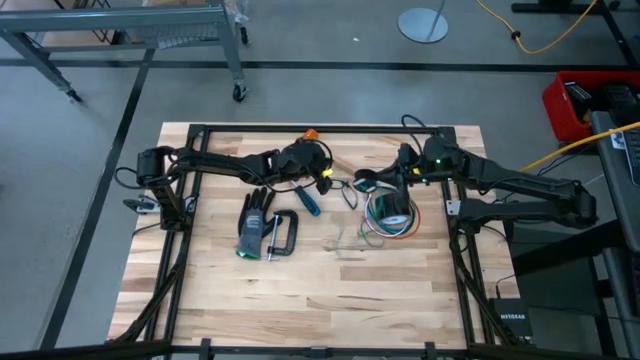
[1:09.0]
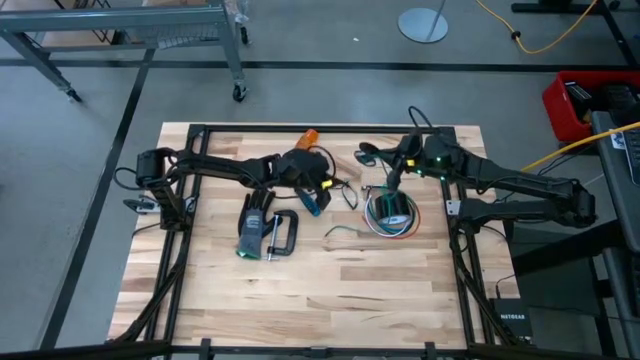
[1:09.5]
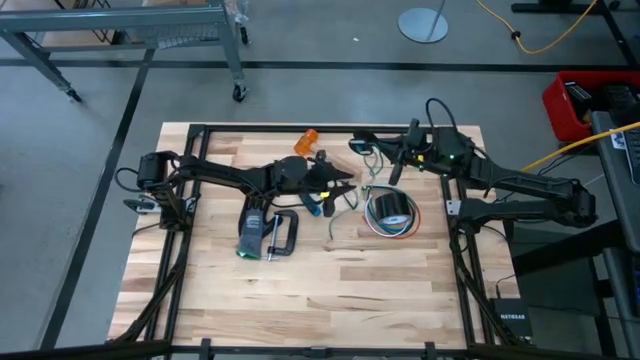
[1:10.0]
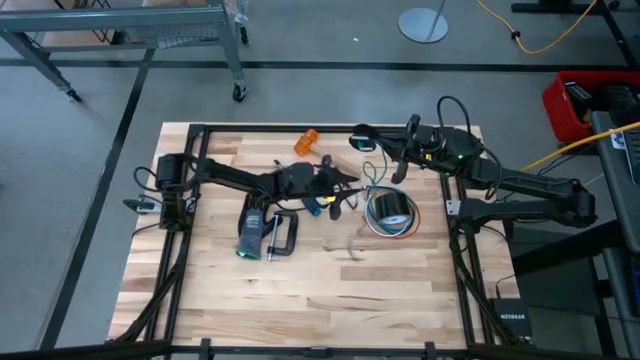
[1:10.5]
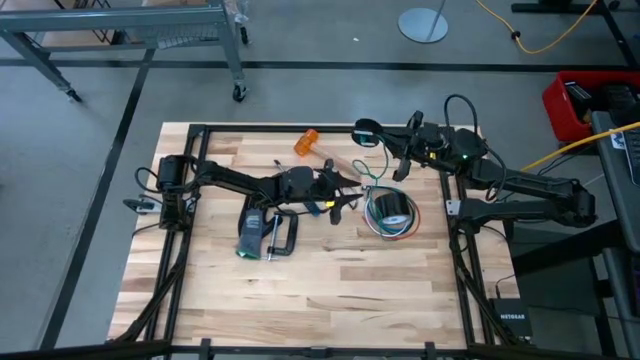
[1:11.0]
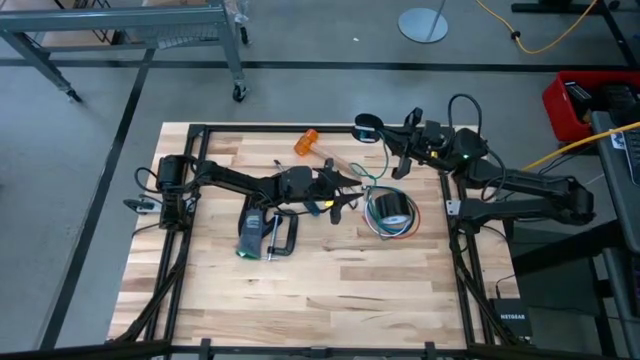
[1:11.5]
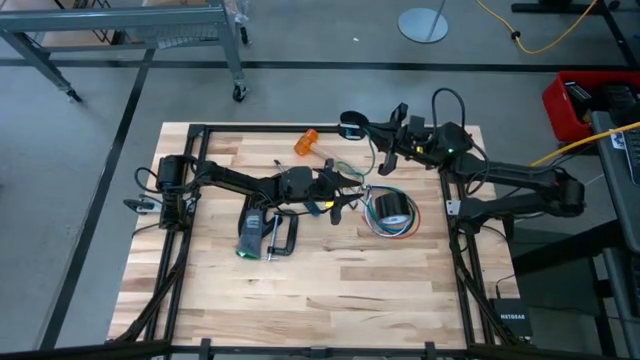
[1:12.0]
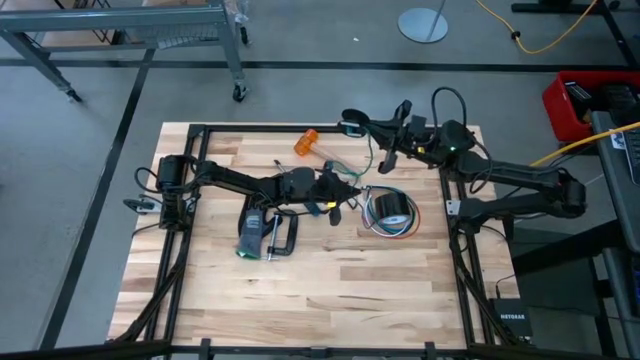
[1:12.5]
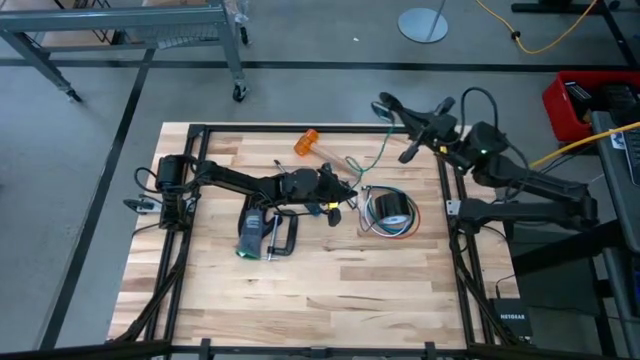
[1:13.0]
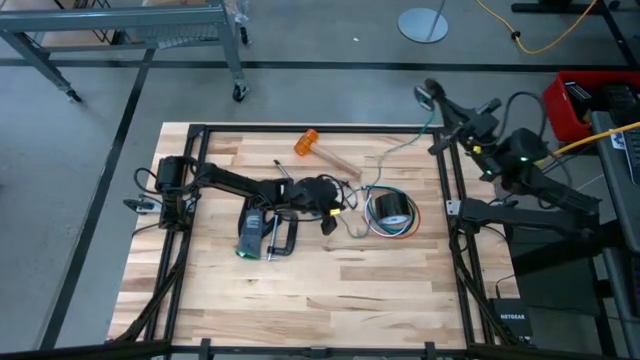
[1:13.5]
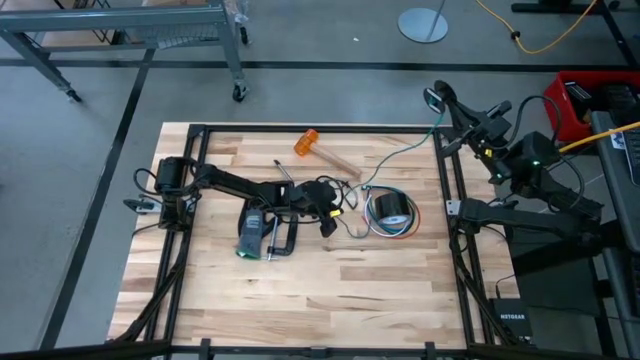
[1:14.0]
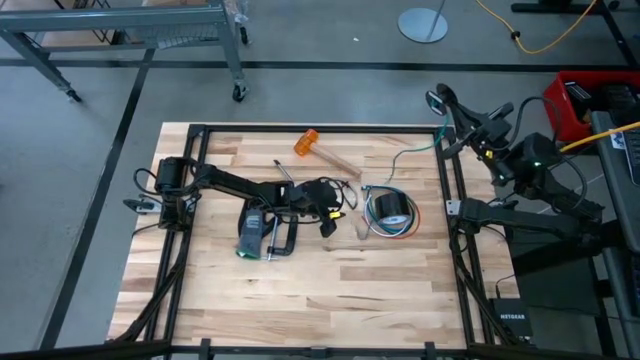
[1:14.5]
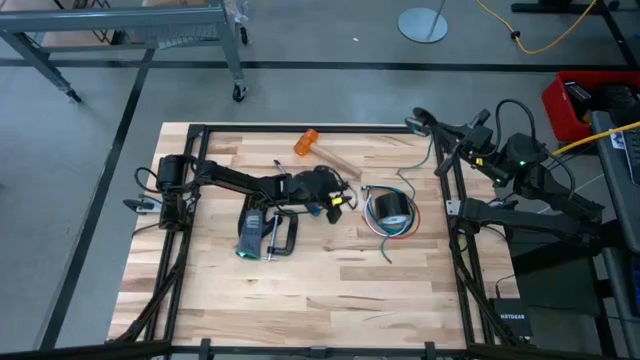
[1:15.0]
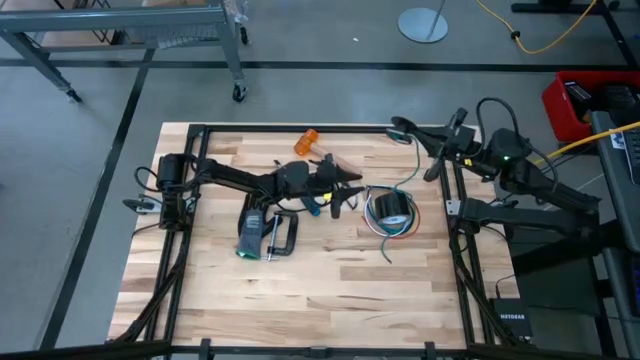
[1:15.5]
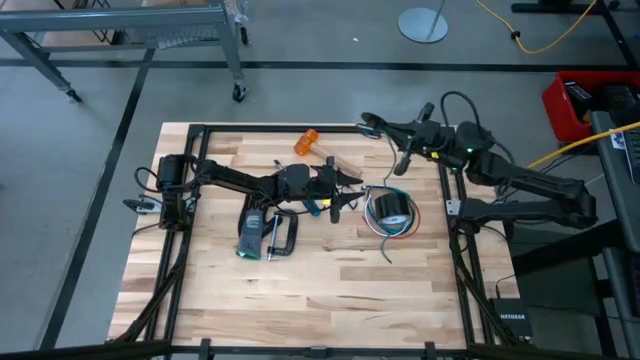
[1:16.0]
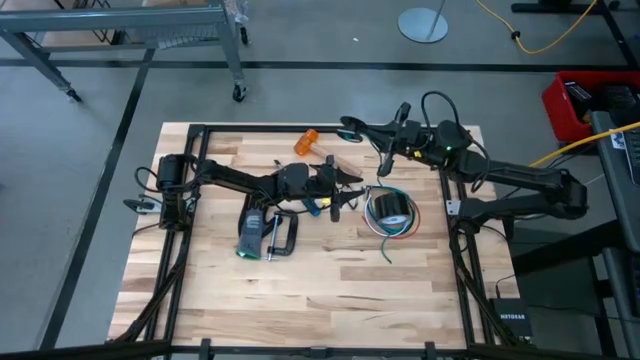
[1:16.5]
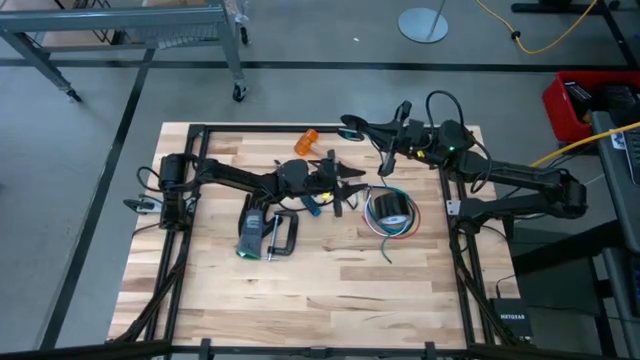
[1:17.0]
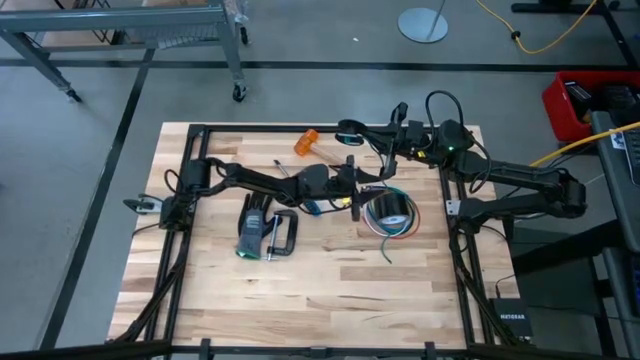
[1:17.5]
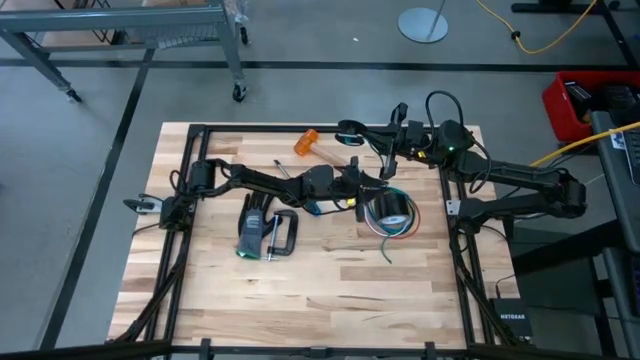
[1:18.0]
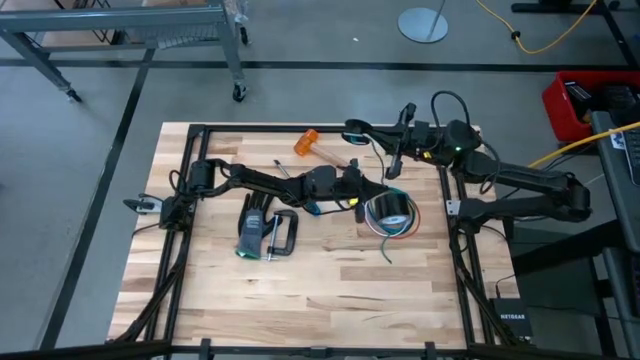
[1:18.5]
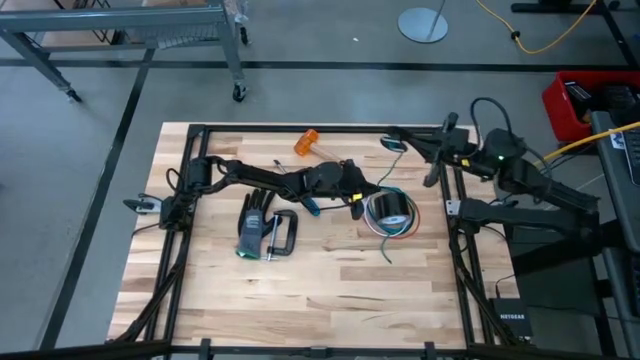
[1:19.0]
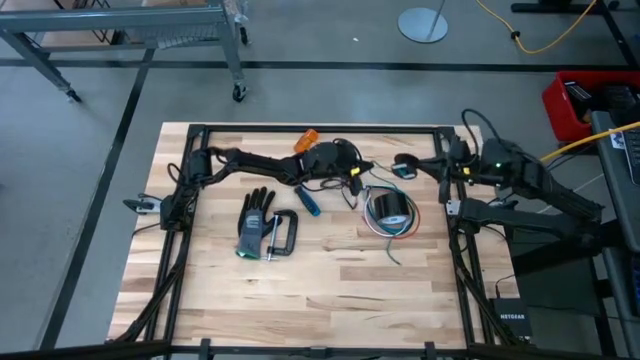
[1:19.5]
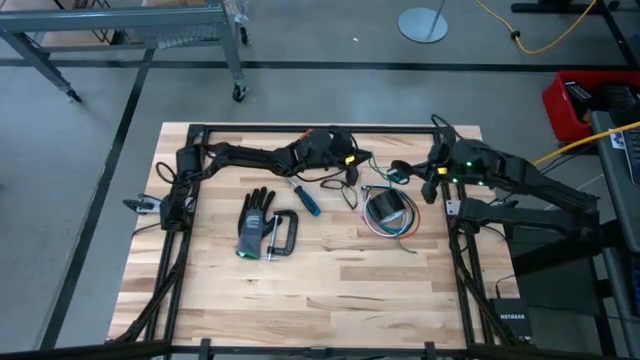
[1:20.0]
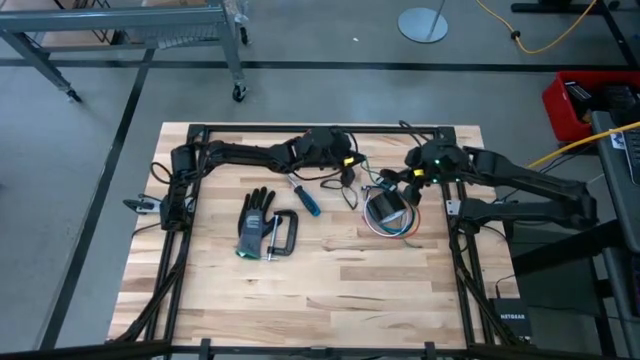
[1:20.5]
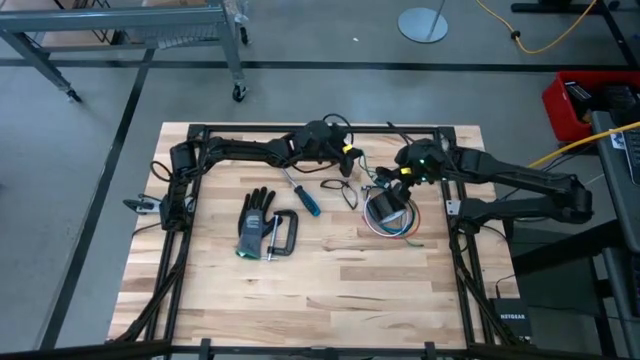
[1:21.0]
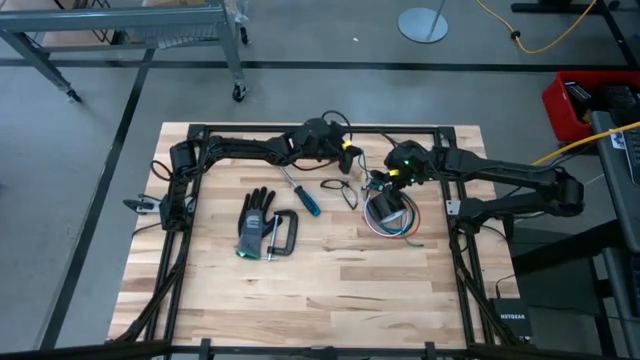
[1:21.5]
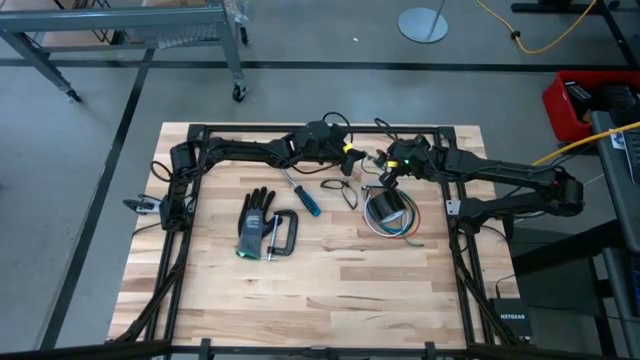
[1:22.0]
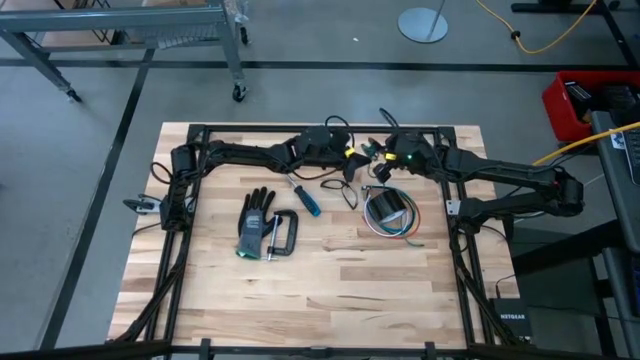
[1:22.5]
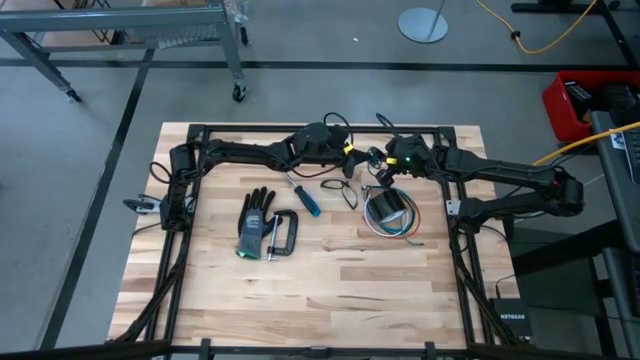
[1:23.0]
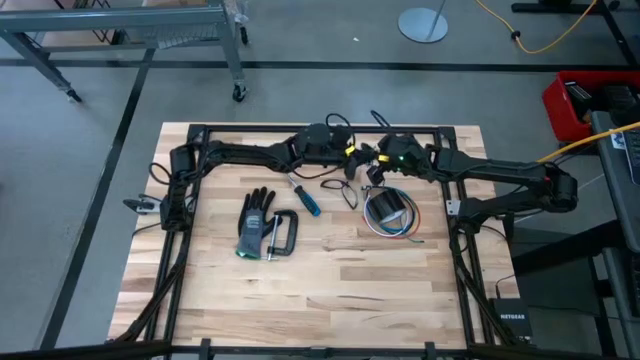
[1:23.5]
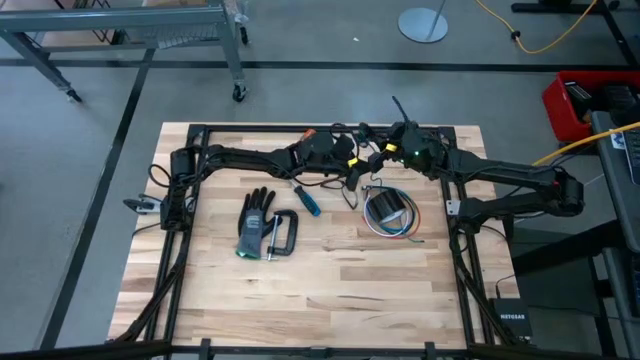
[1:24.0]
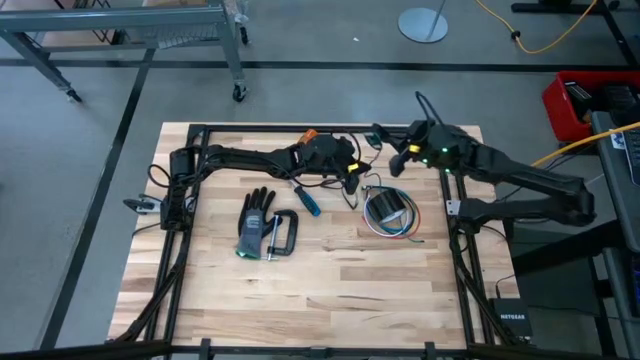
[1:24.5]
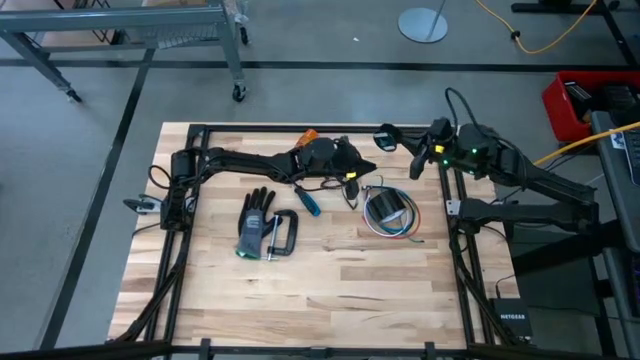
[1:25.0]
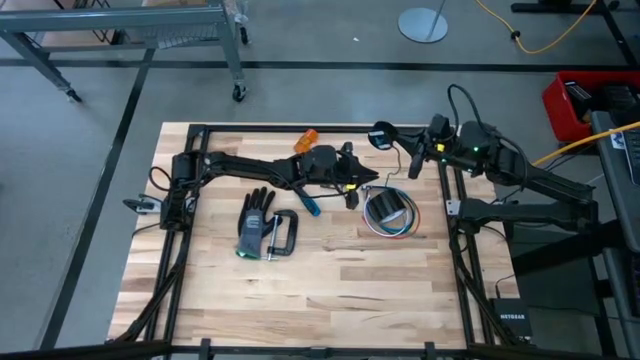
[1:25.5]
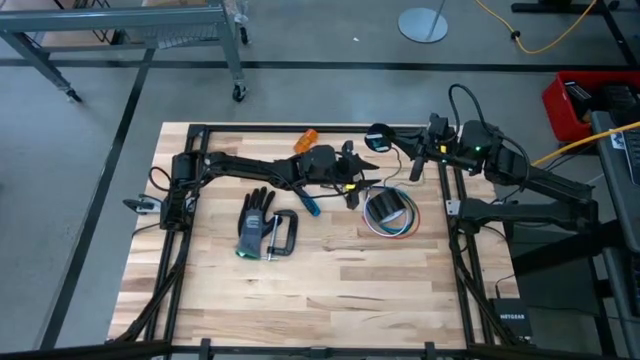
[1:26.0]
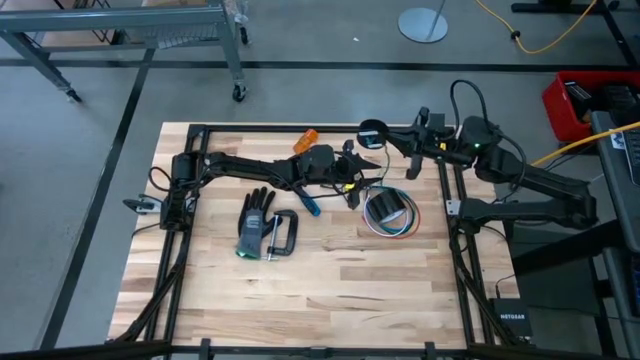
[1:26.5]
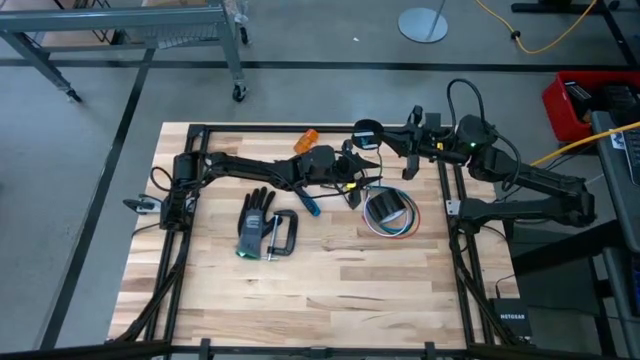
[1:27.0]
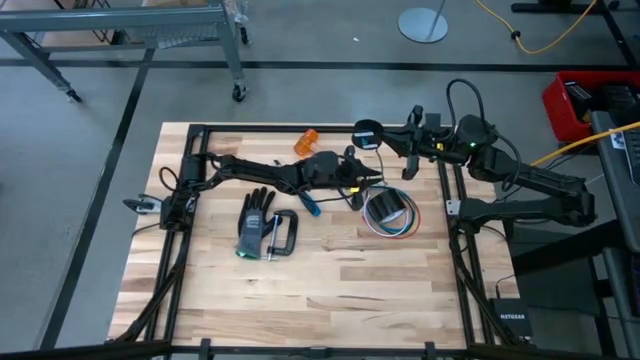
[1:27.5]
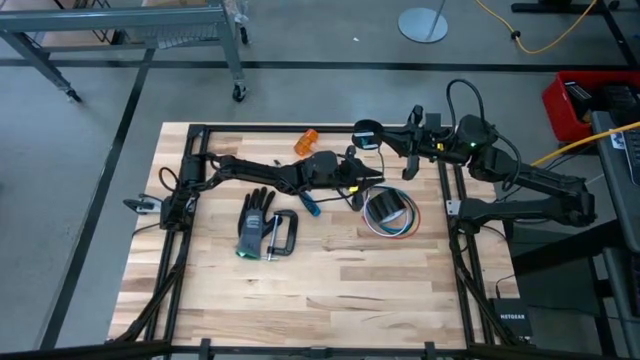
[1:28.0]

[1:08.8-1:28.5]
Task: Coil cords
Coil the green wire onto the spool

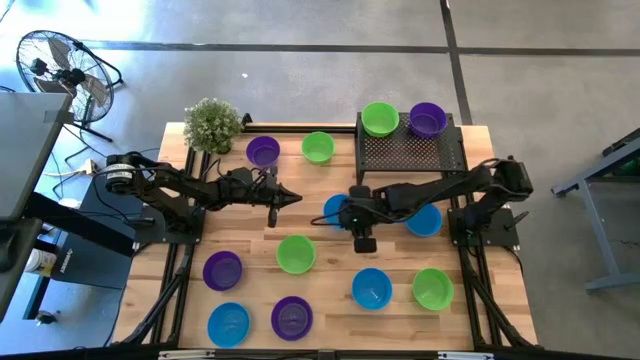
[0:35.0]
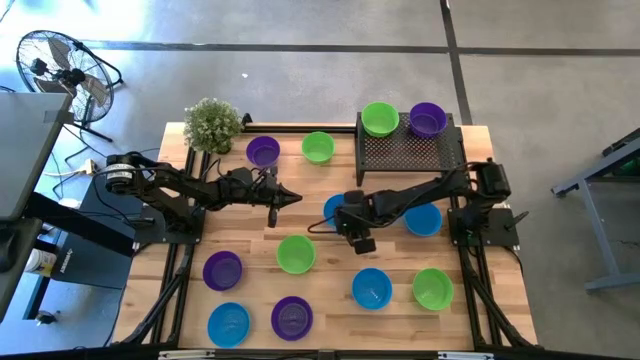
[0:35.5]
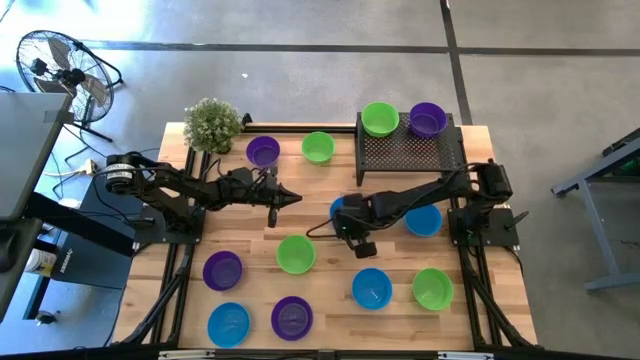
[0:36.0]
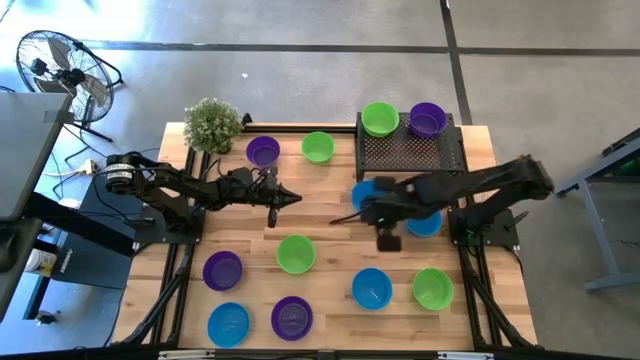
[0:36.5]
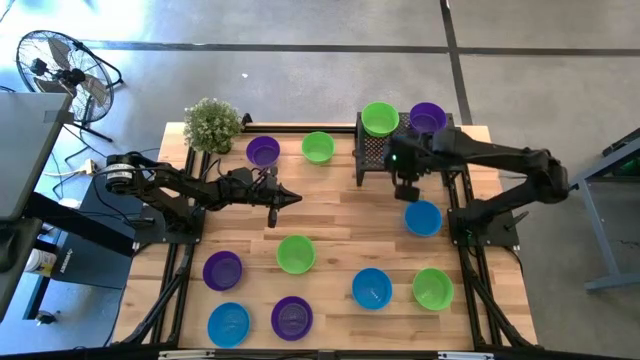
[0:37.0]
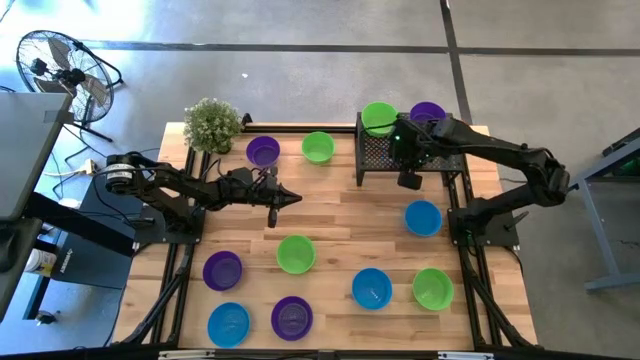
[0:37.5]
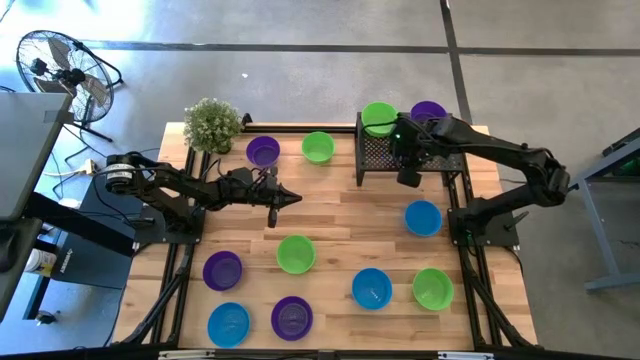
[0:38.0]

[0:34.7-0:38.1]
Task: Pick & Place Mini bowls
Put the blue bowl on the shelf
